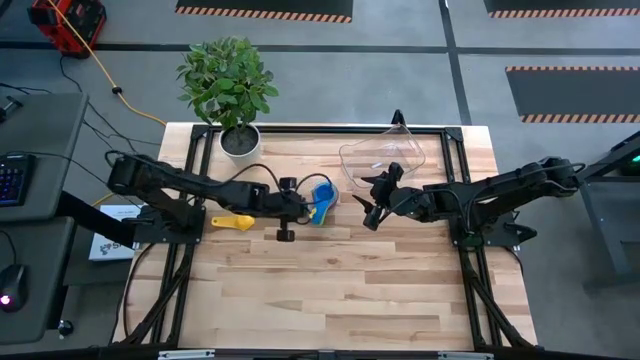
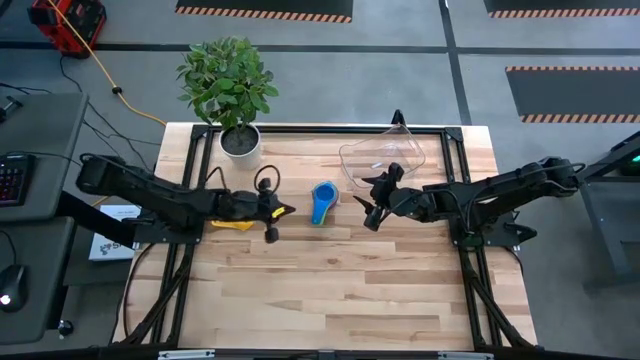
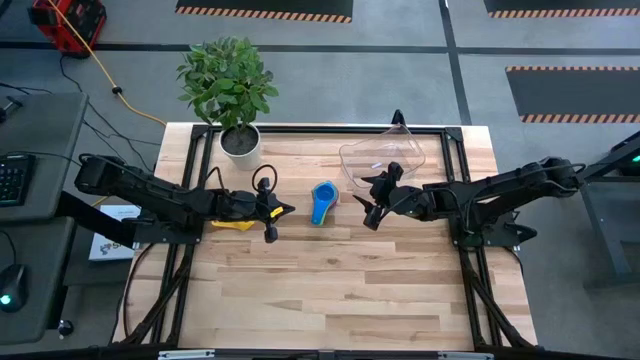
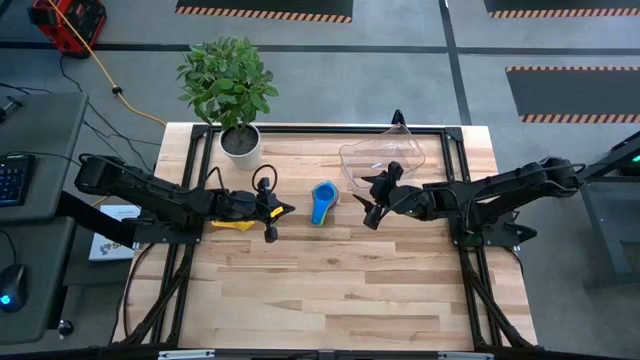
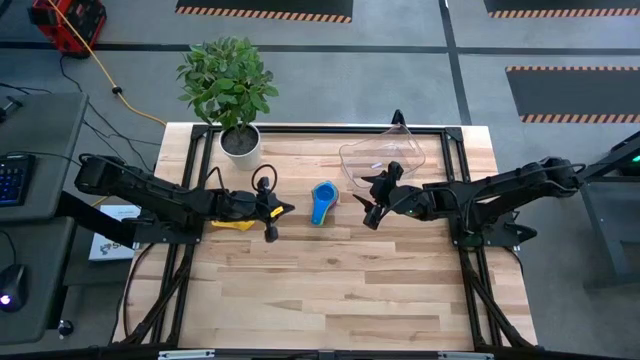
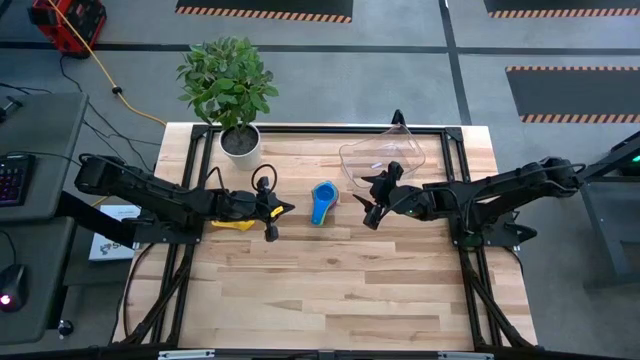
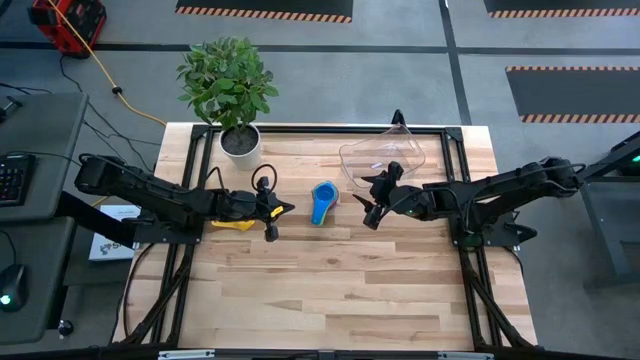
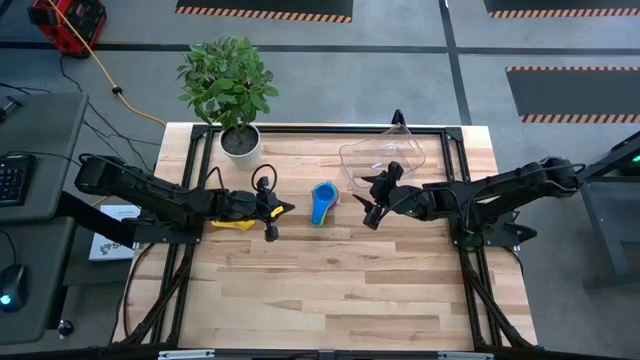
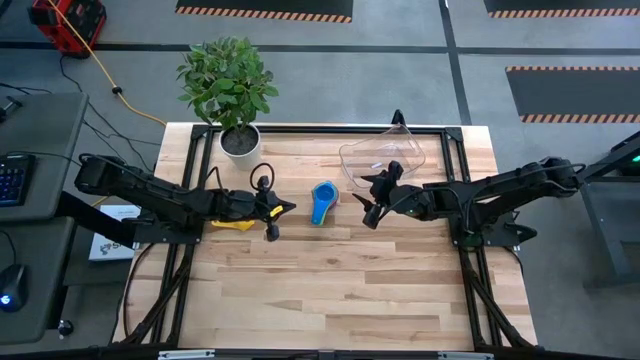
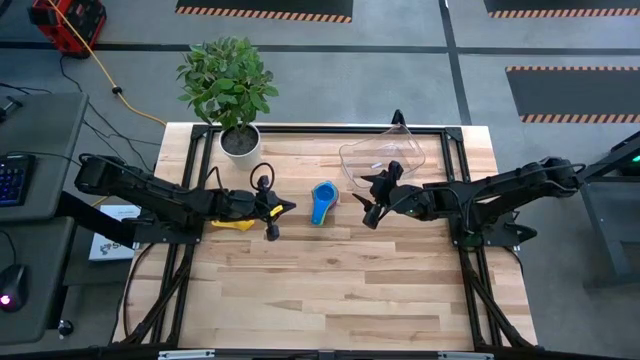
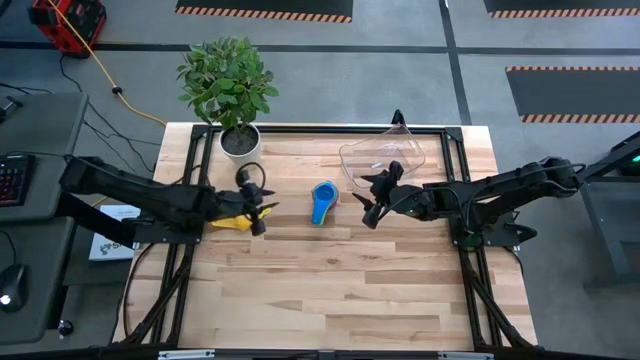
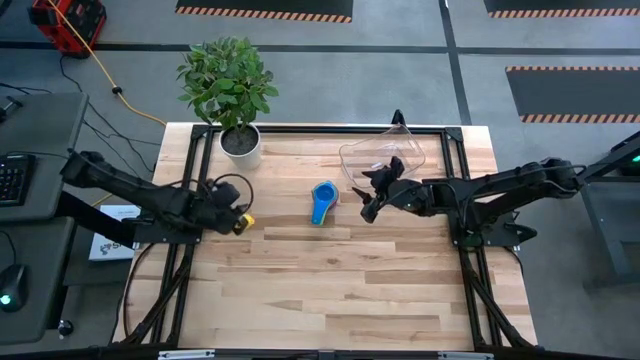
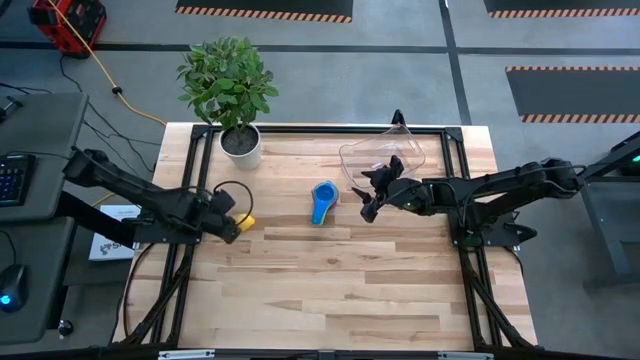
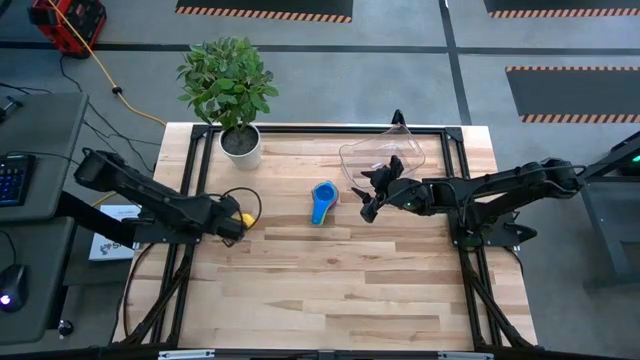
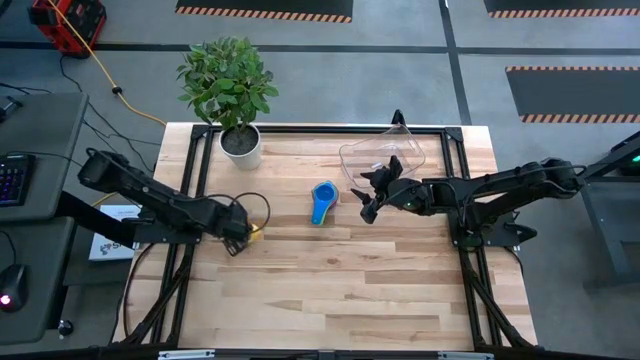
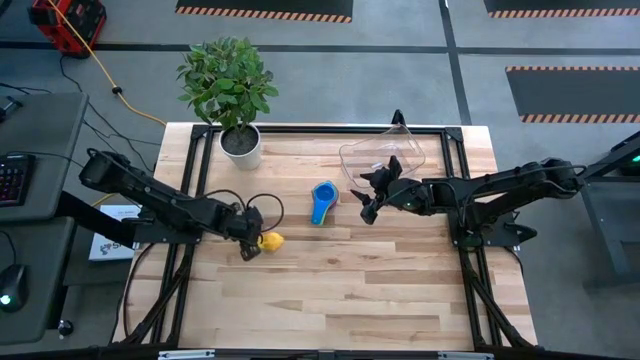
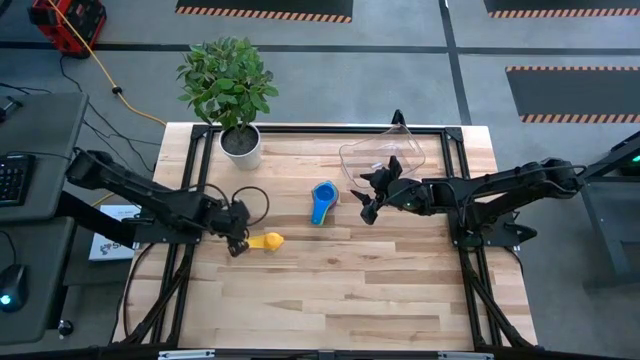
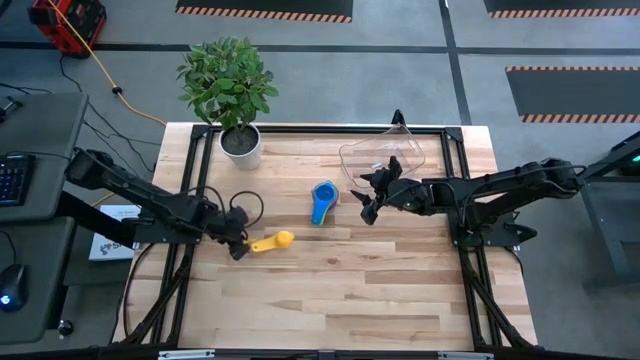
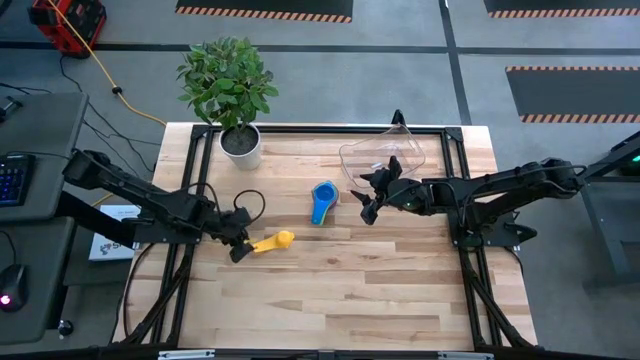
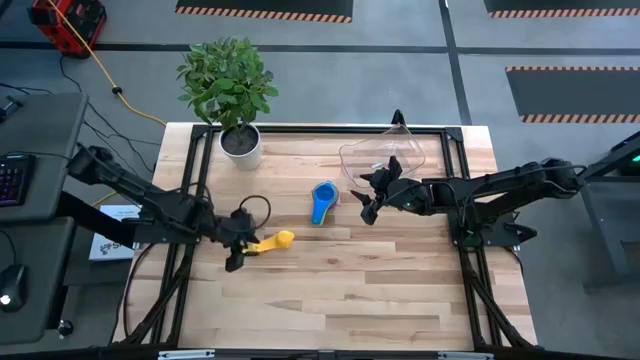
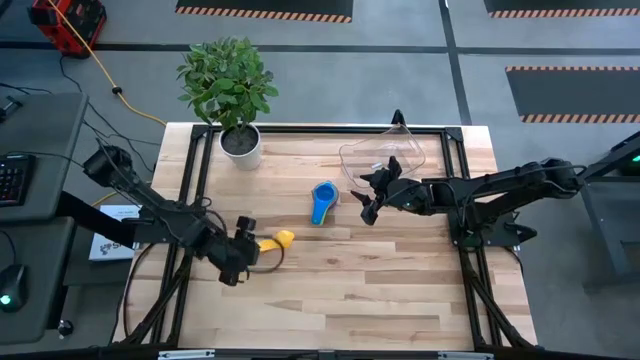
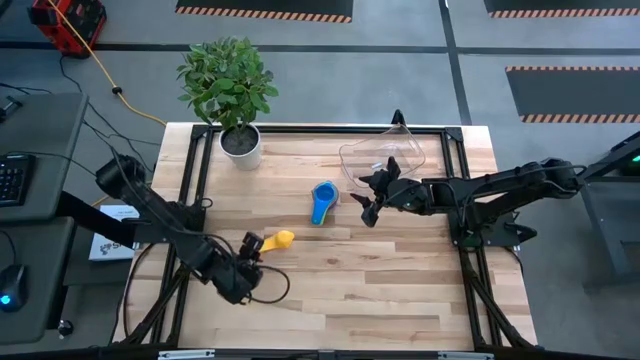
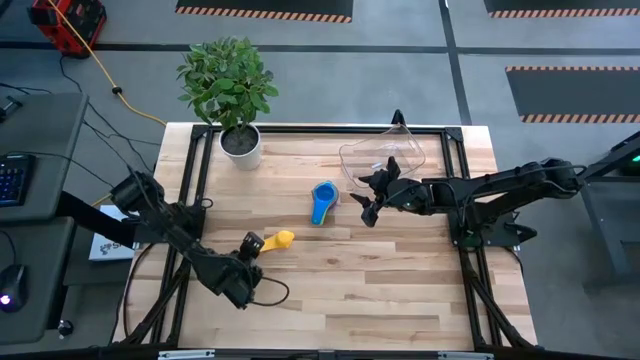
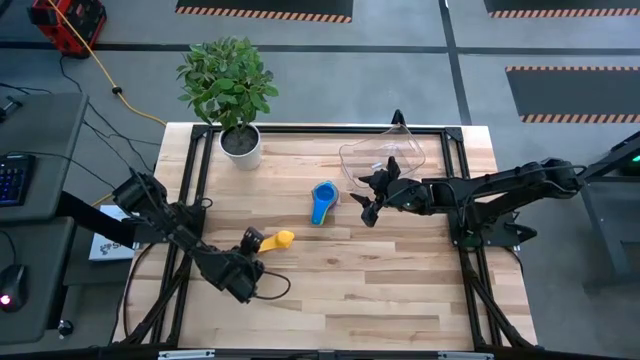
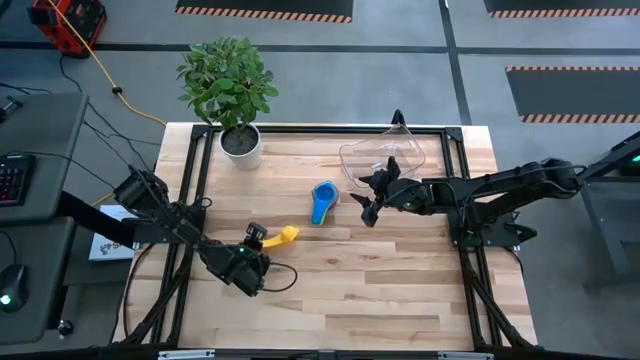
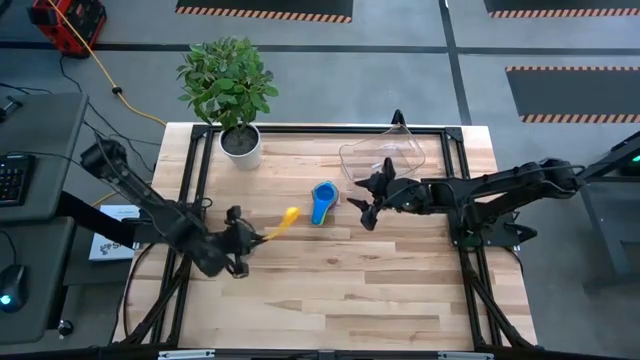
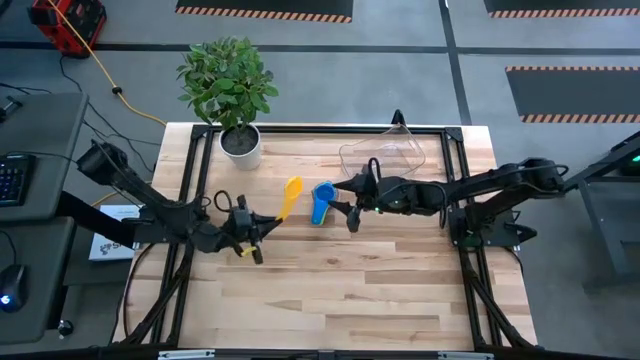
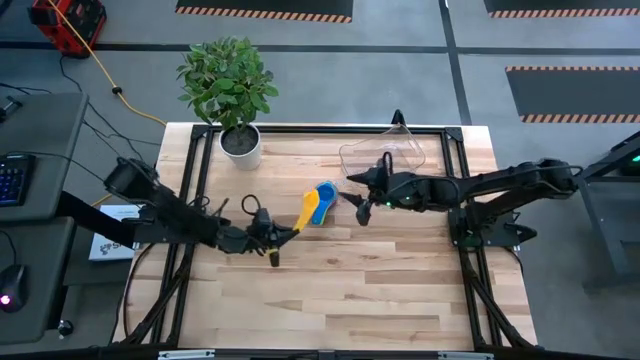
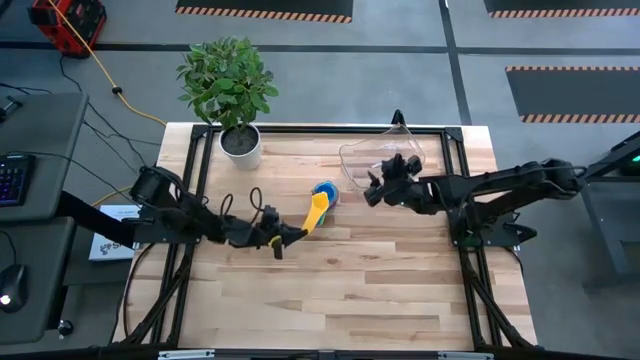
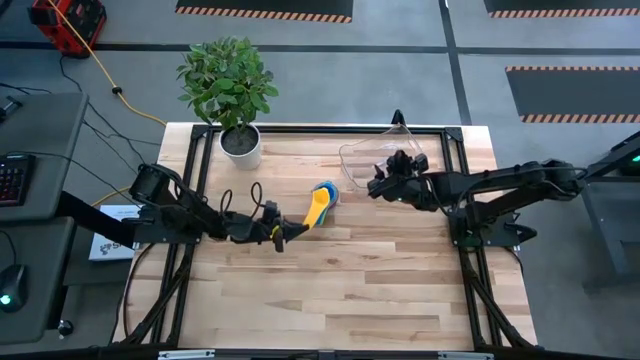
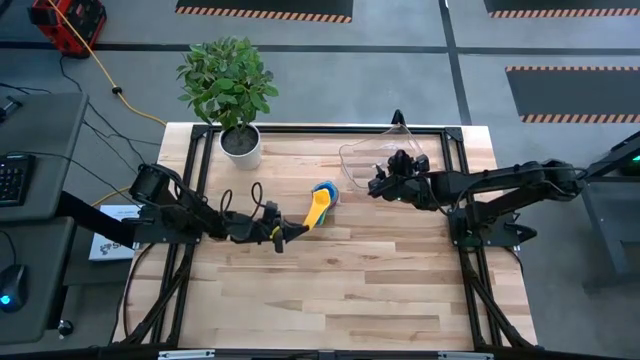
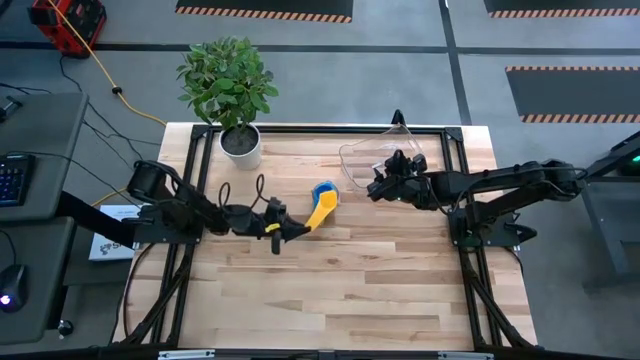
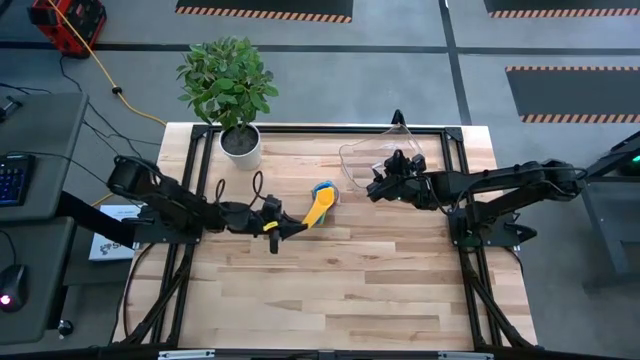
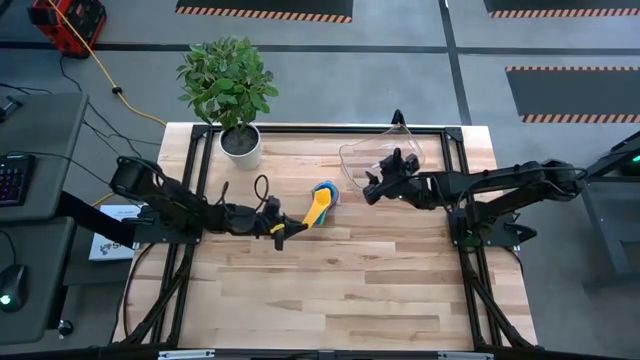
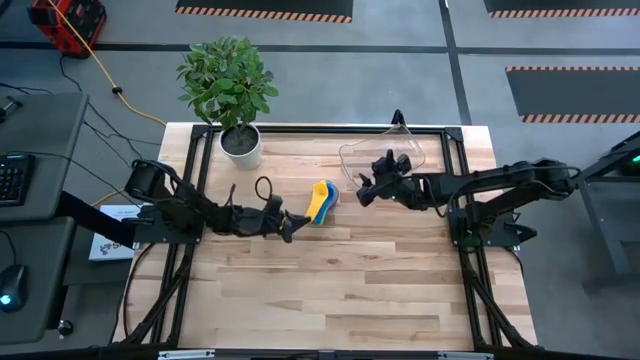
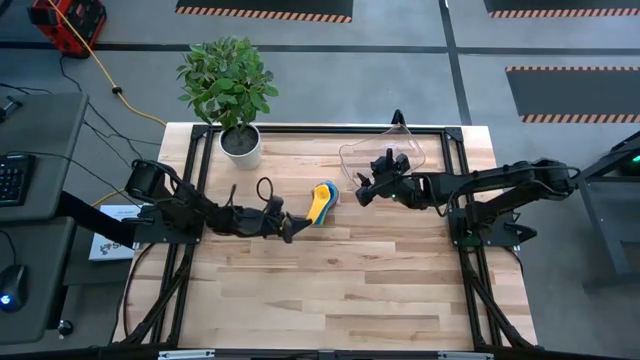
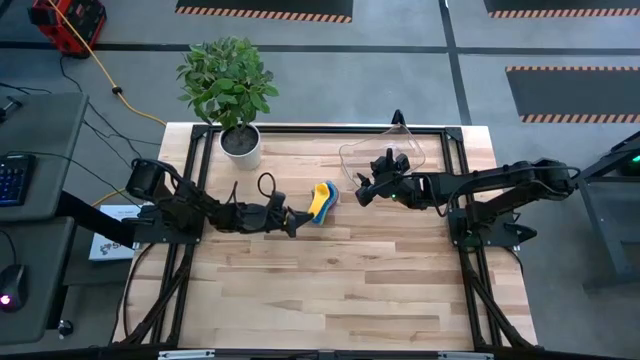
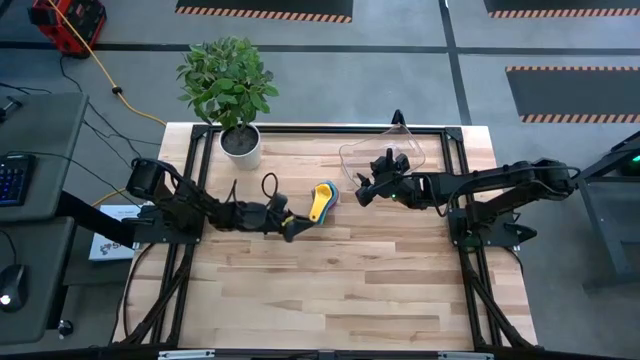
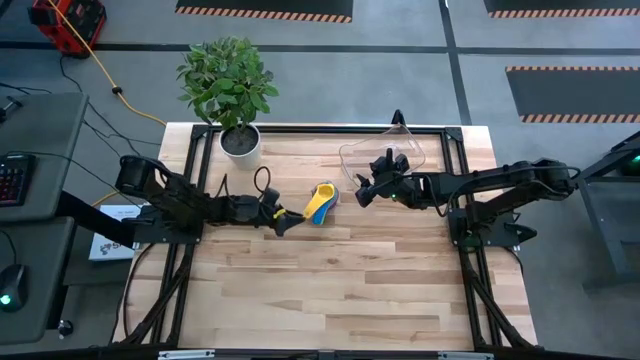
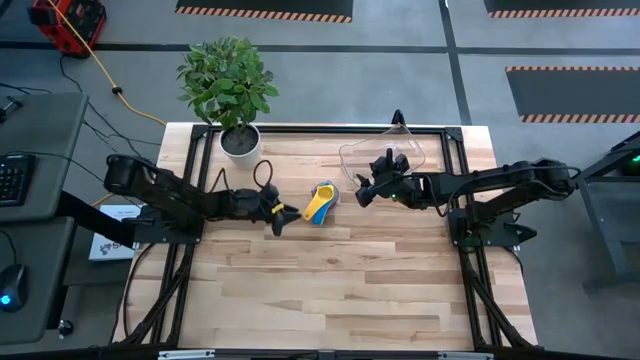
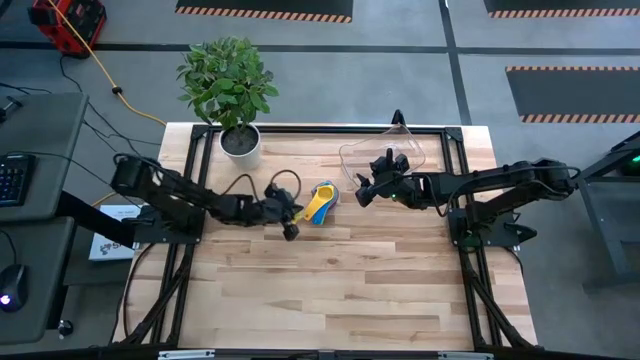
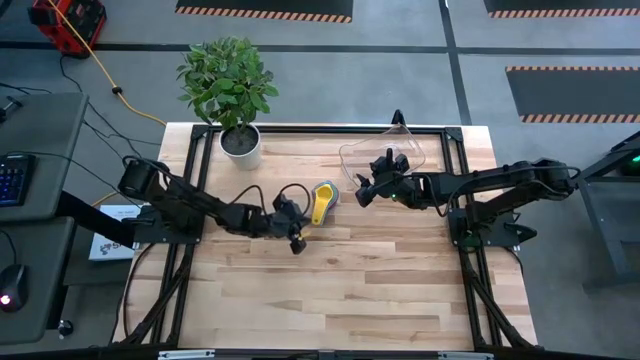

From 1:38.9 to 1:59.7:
Task: Nest measuring cups in basket
Stack the yellow measuring cup on top of the blue measuring cup
